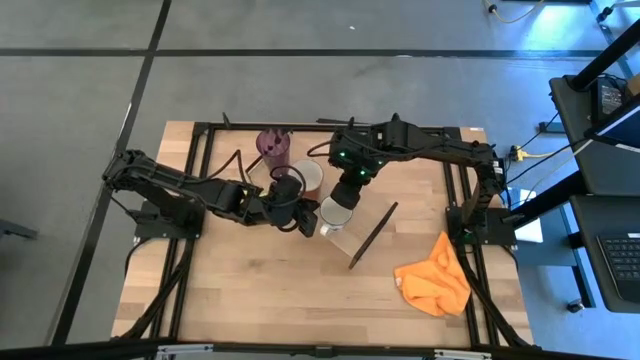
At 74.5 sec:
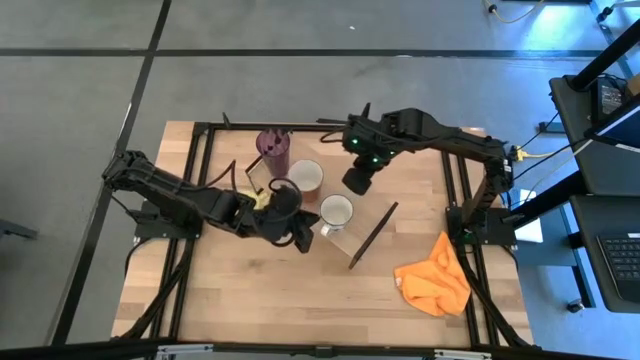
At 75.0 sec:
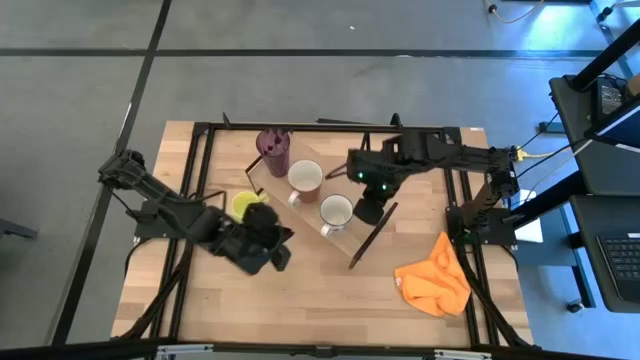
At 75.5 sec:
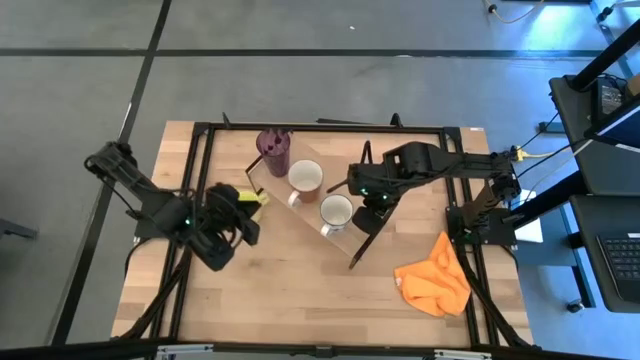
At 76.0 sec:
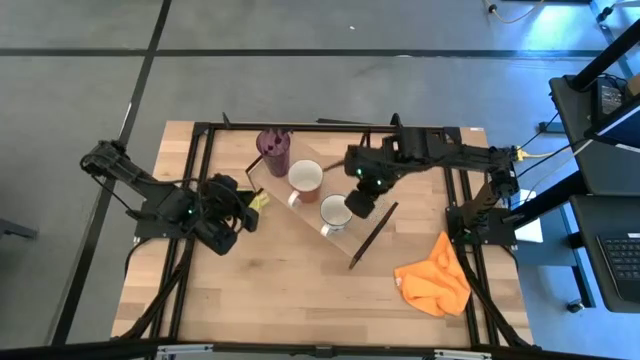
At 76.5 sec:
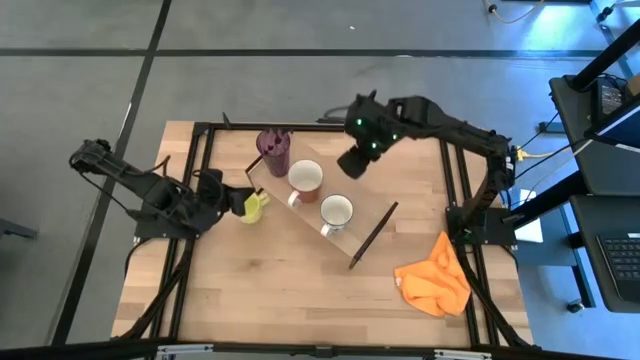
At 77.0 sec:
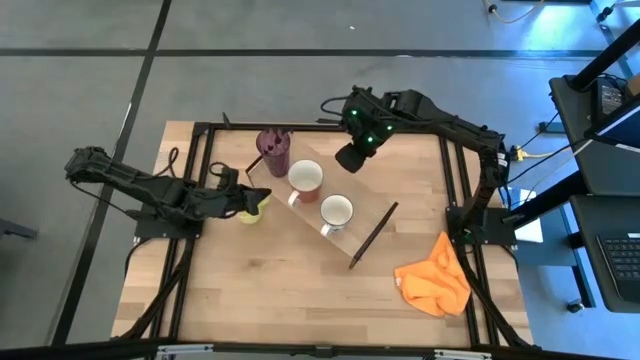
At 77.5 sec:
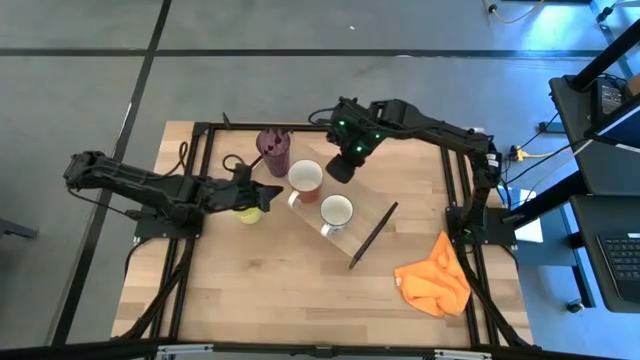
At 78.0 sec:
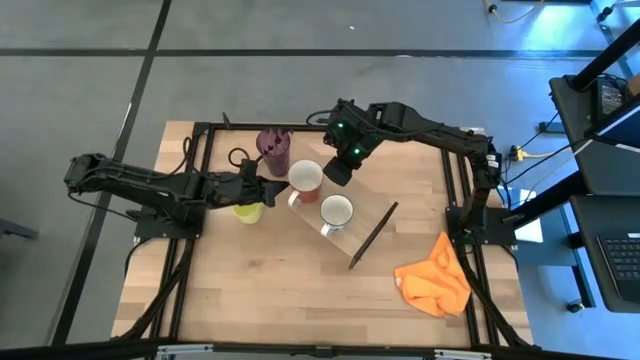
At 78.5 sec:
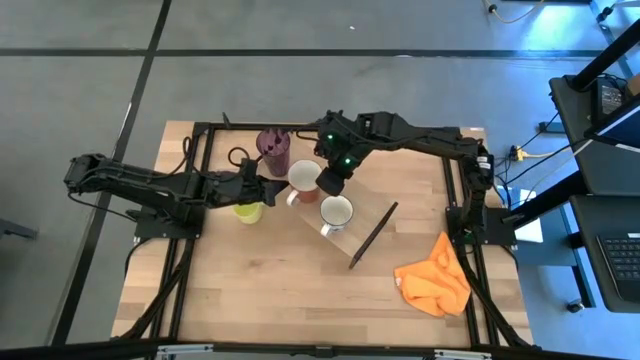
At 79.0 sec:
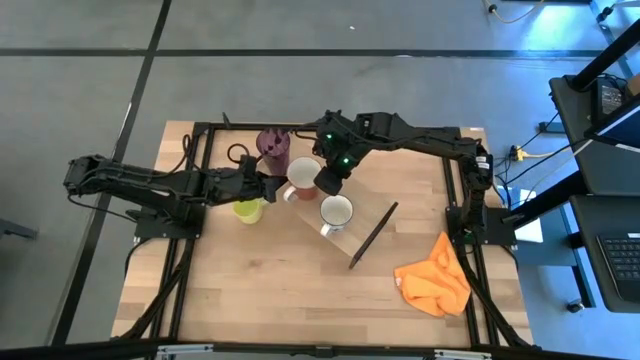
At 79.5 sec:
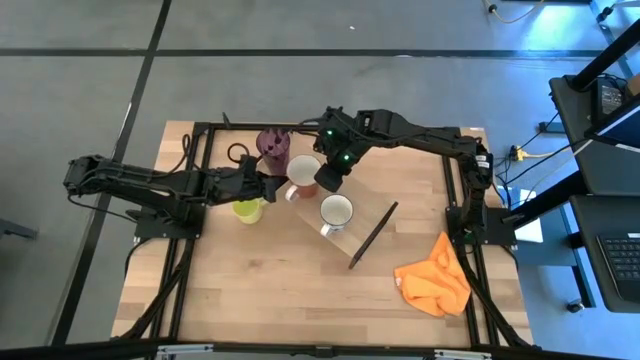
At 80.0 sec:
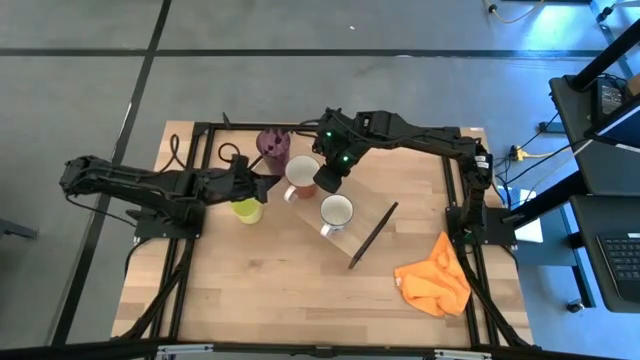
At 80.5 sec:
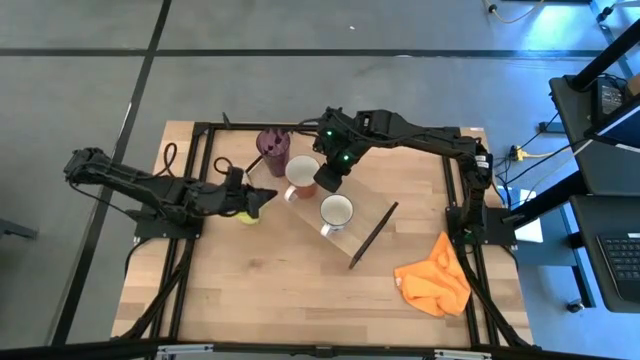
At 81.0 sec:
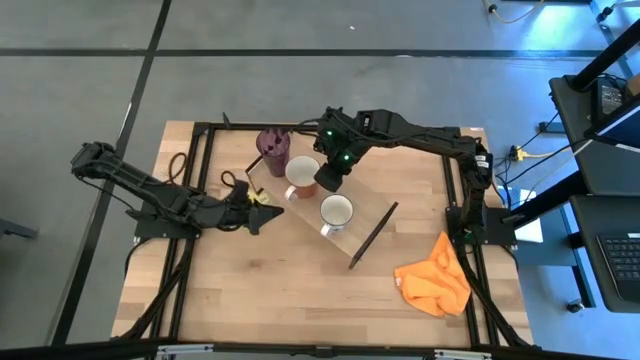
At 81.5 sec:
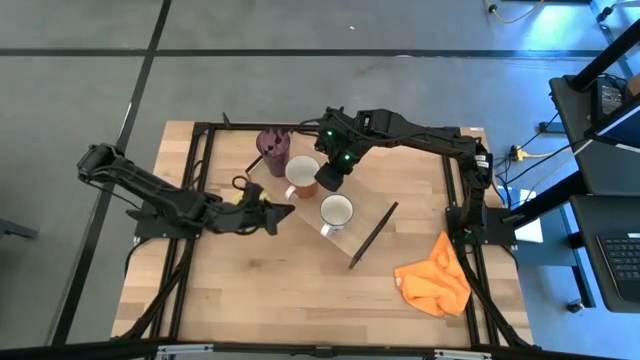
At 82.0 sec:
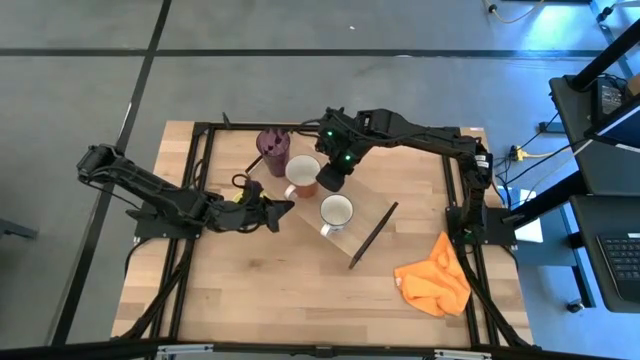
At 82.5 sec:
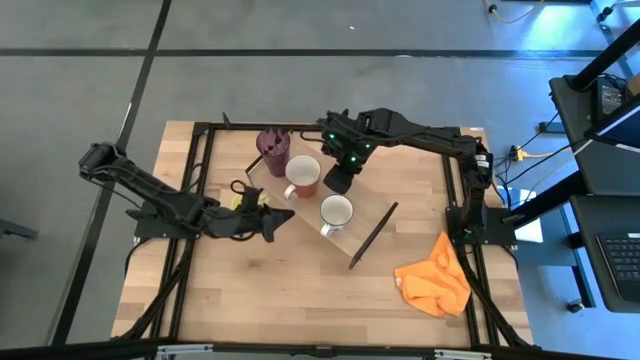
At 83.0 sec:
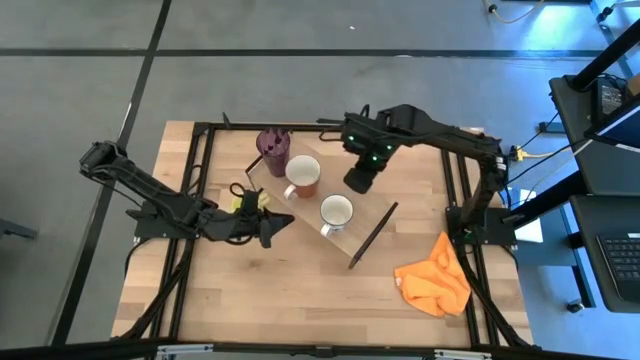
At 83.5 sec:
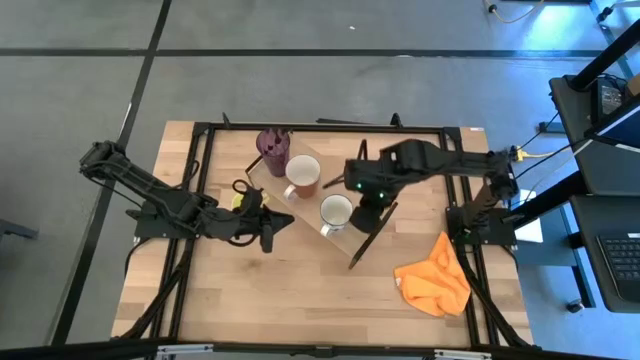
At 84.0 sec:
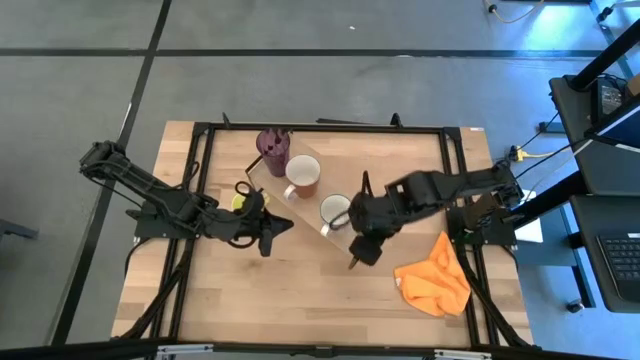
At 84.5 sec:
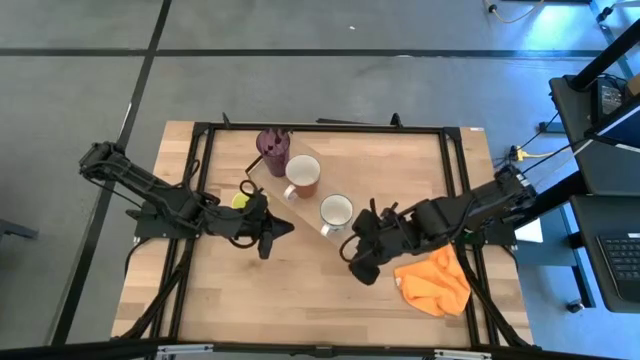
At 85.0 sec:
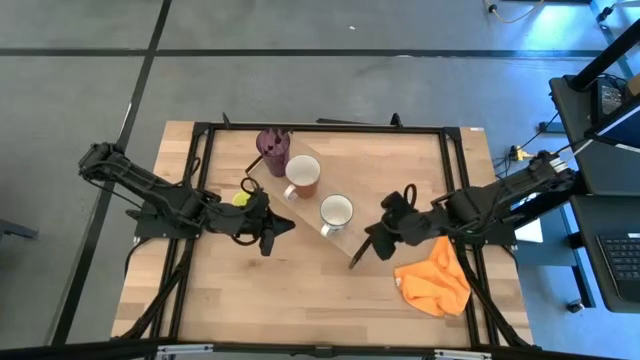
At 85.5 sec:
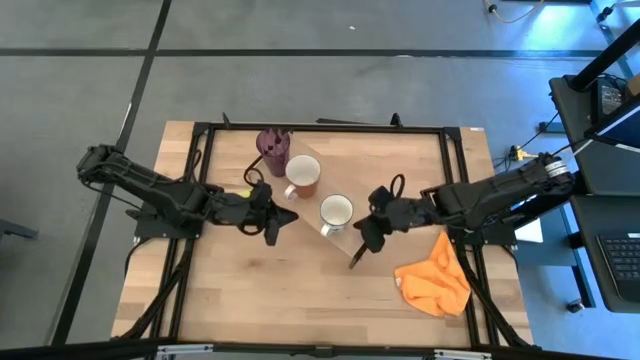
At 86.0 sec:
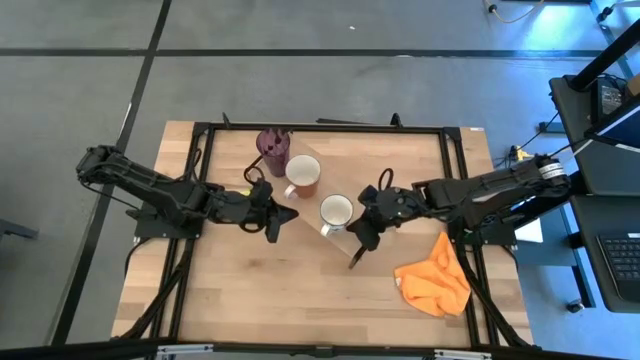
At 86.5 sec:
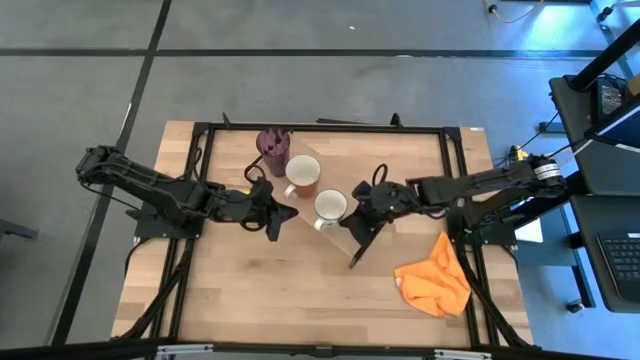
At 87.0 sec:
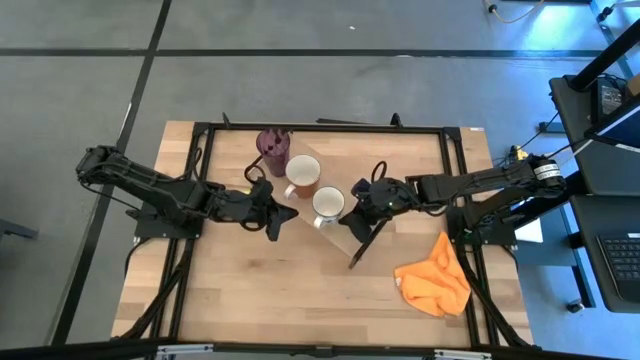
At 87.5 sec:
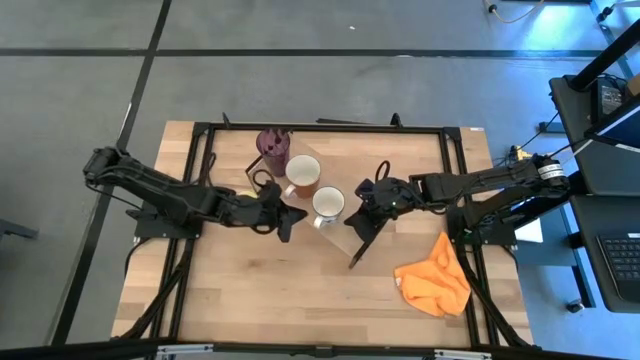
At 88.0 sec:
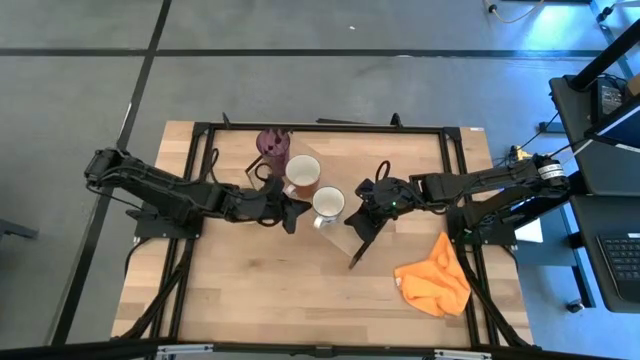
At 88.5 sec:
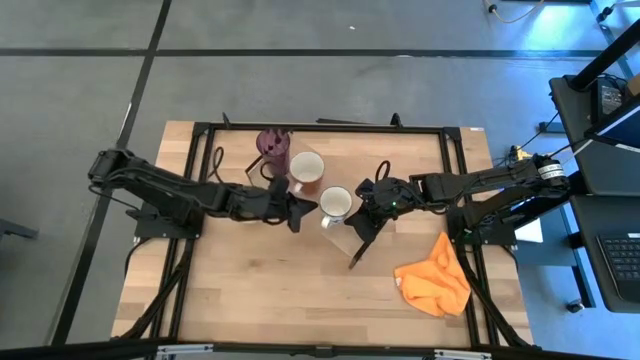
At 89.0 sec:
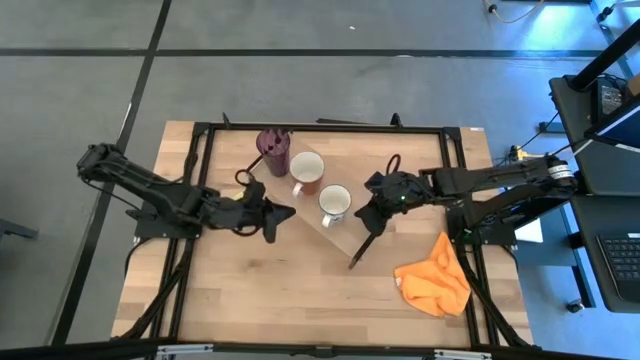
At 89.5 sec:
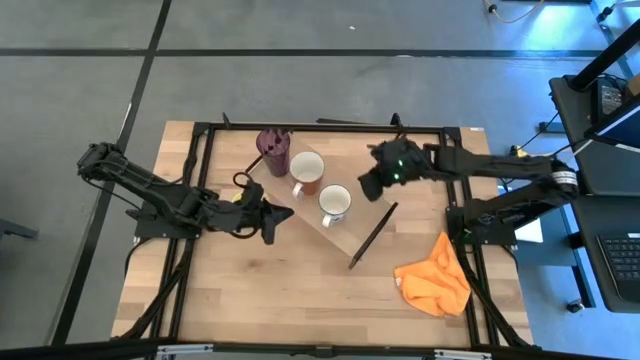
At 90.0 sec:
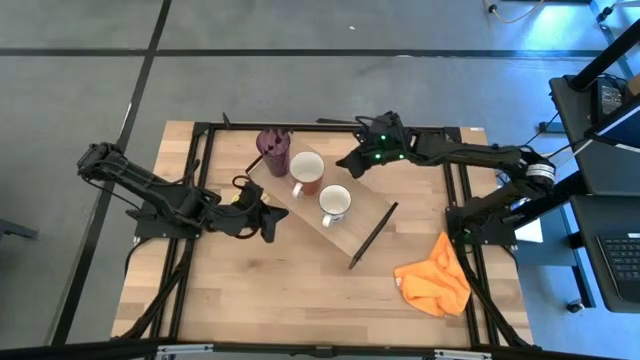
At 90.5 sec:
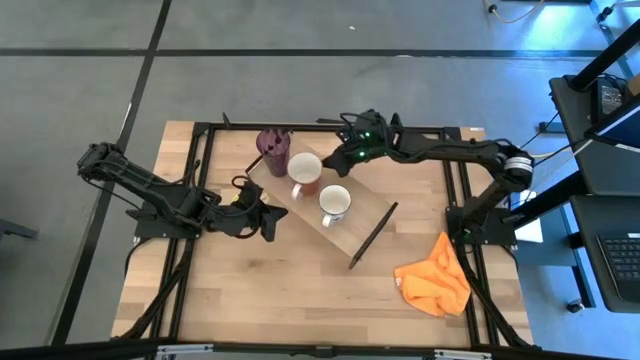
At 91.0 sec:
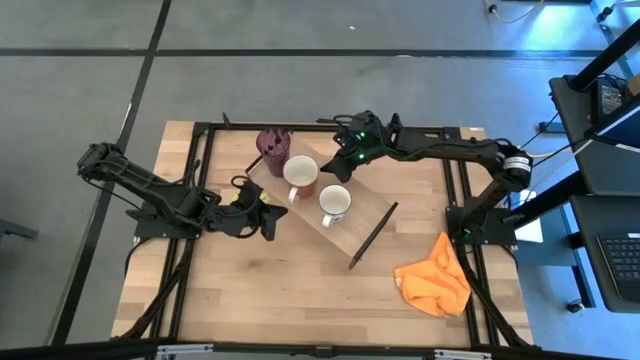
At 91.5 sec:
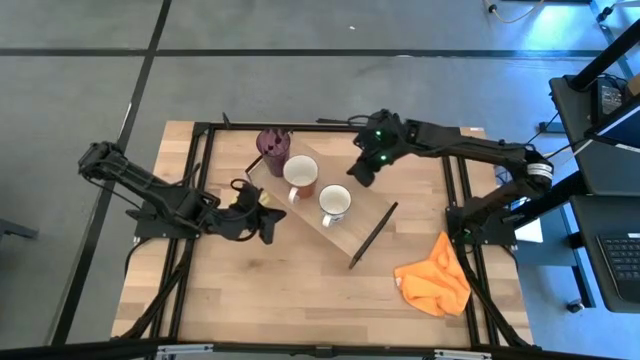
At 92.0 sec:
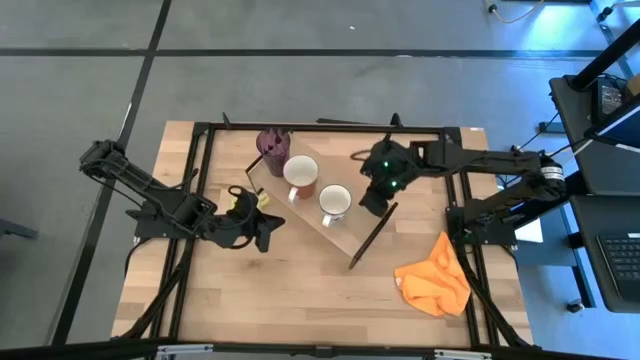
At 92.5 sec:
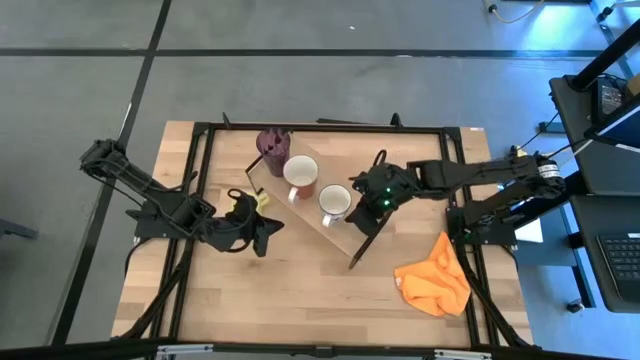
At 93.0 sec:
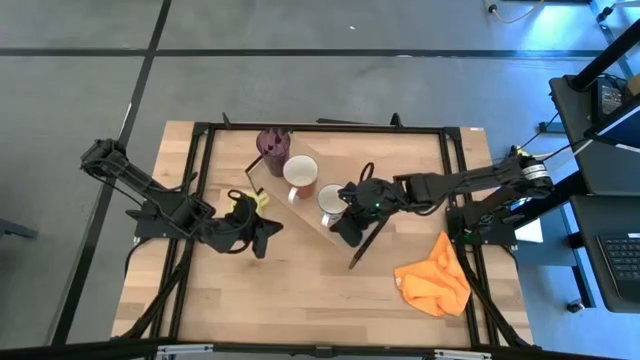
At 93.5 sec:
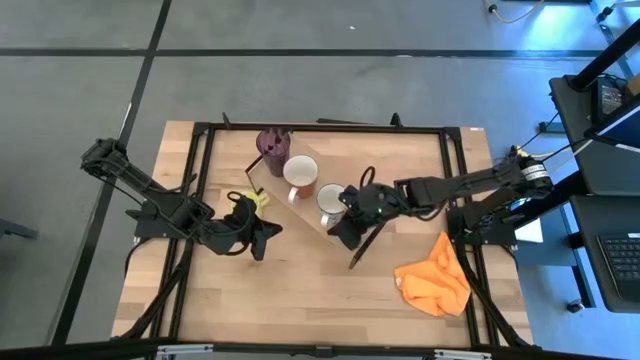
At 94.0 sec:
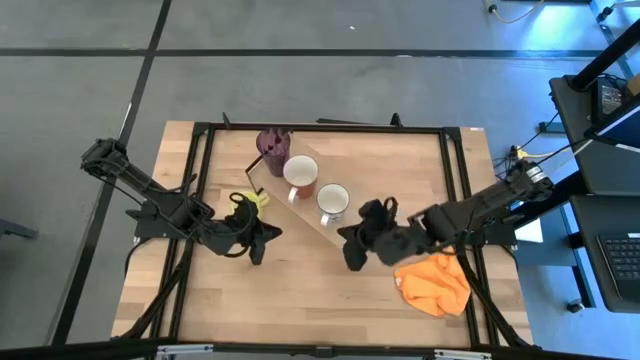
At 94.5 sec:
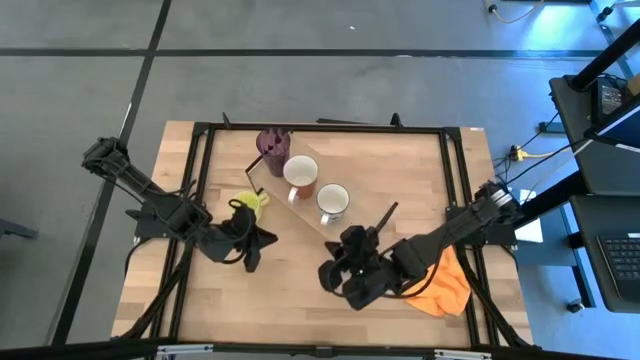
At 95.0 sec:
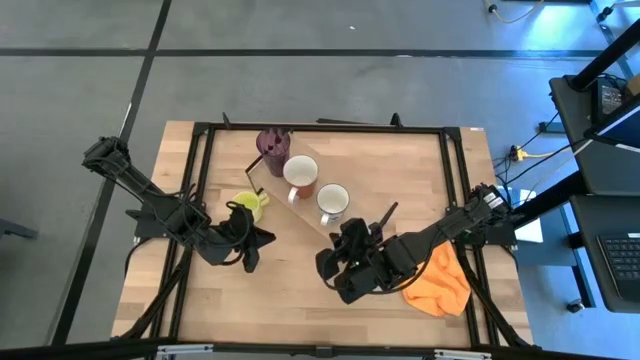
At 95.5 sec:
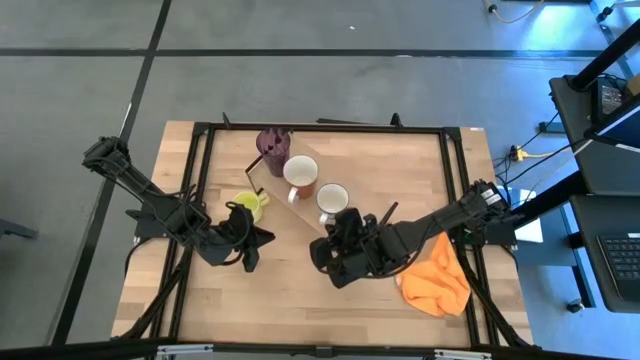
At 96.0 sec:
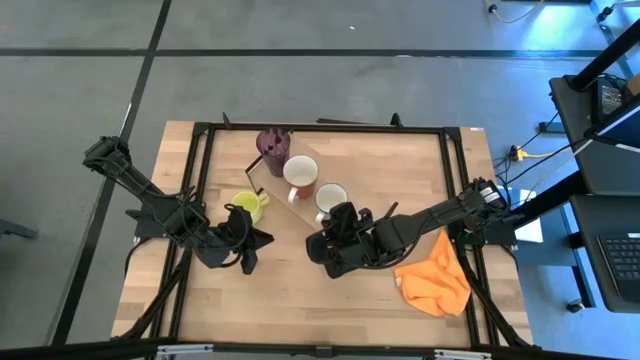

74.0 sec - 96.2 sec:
Task: Stack small to large cups/mugs on shelf
Adjust the mugs on the shelf
